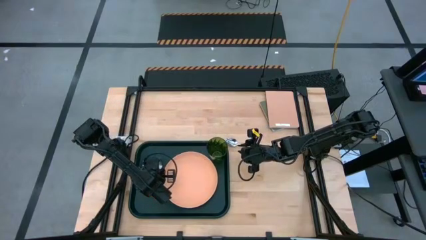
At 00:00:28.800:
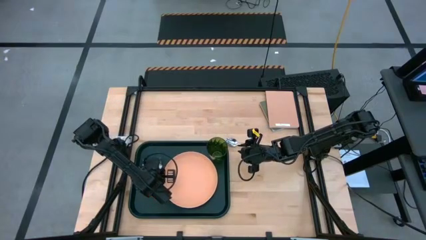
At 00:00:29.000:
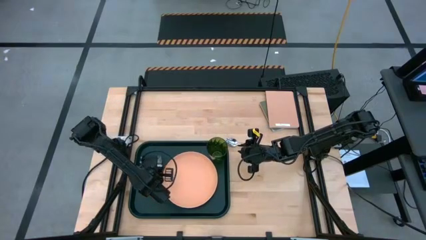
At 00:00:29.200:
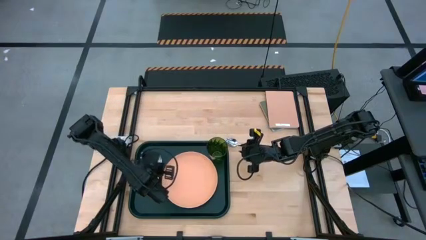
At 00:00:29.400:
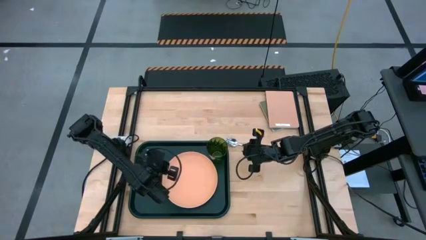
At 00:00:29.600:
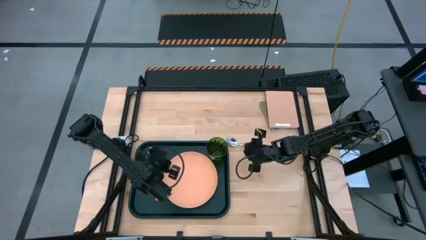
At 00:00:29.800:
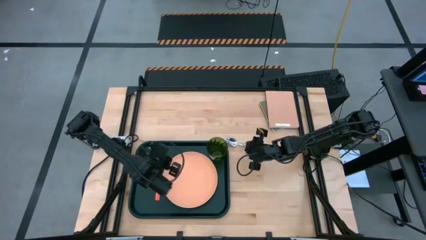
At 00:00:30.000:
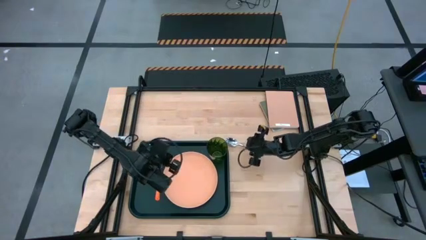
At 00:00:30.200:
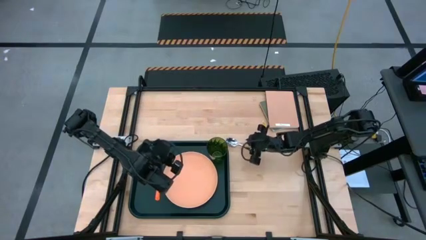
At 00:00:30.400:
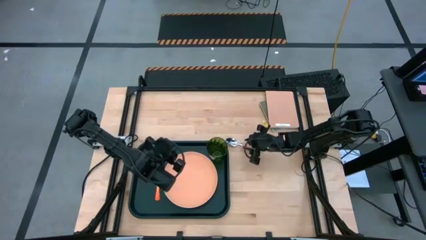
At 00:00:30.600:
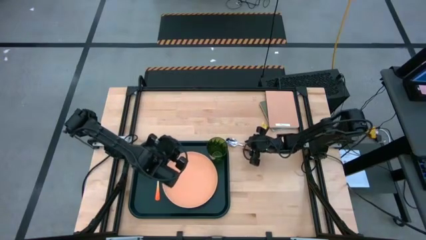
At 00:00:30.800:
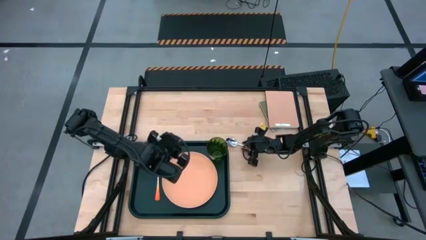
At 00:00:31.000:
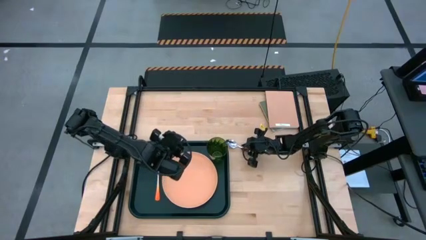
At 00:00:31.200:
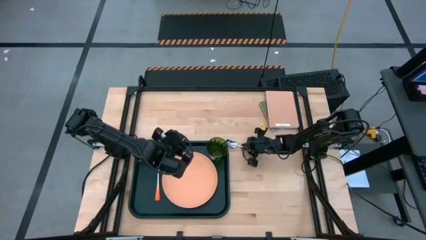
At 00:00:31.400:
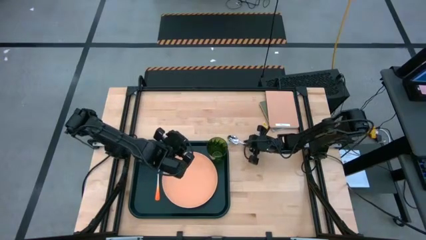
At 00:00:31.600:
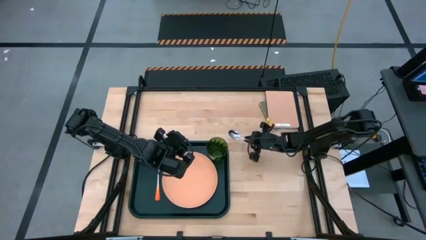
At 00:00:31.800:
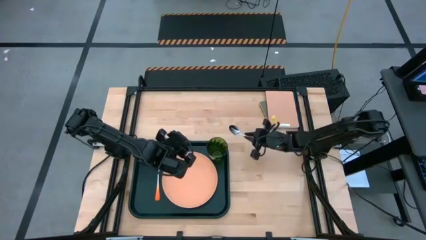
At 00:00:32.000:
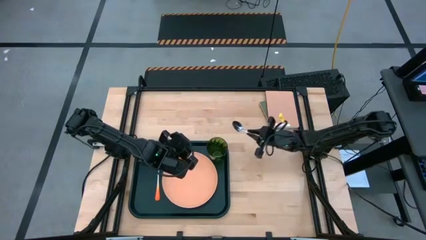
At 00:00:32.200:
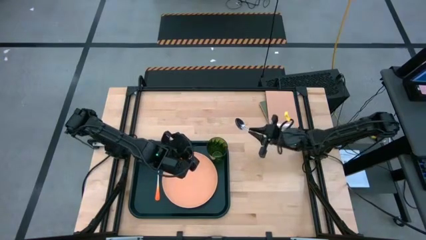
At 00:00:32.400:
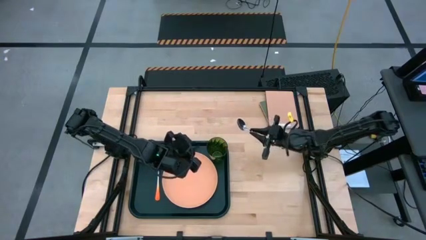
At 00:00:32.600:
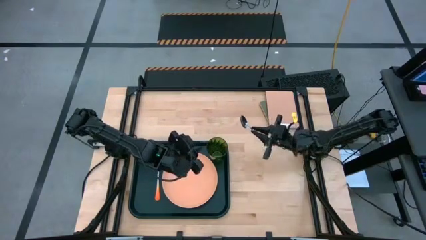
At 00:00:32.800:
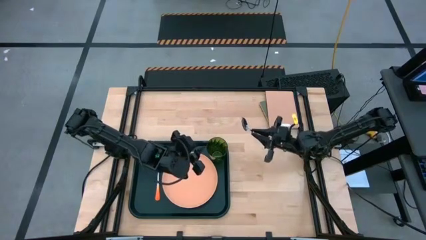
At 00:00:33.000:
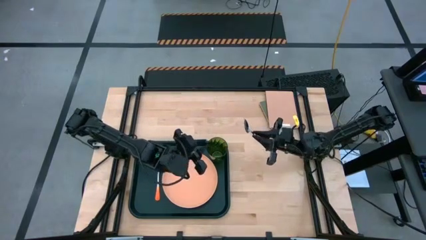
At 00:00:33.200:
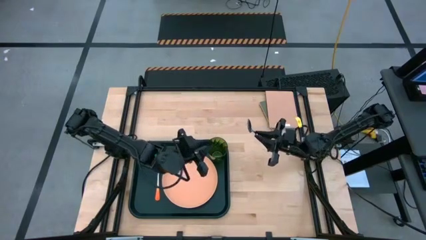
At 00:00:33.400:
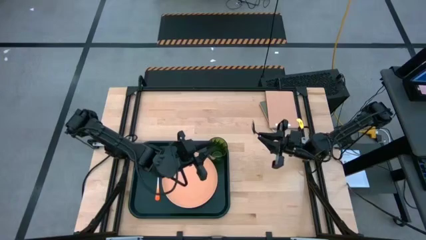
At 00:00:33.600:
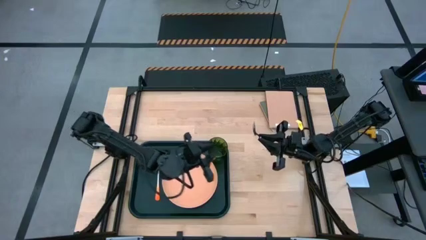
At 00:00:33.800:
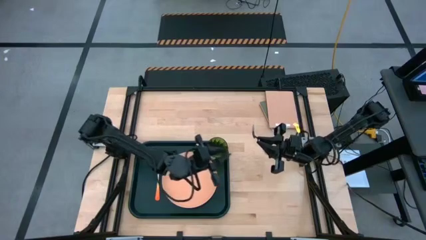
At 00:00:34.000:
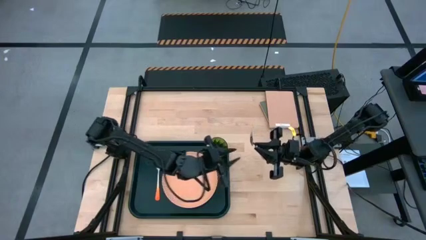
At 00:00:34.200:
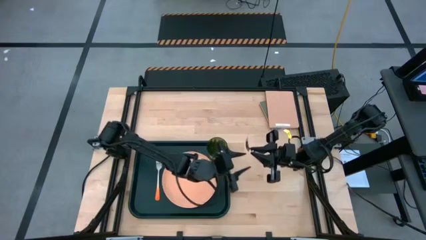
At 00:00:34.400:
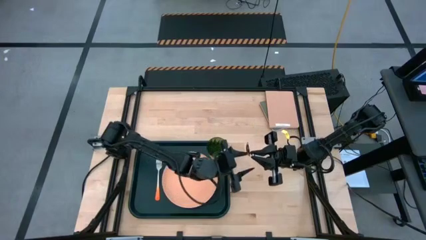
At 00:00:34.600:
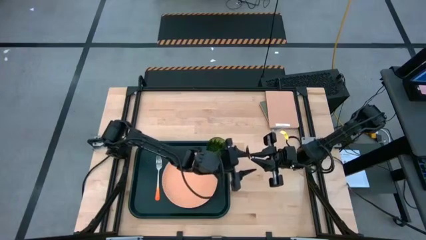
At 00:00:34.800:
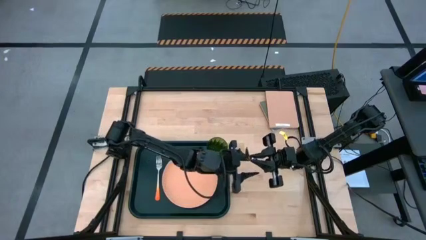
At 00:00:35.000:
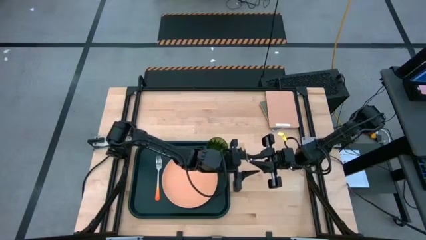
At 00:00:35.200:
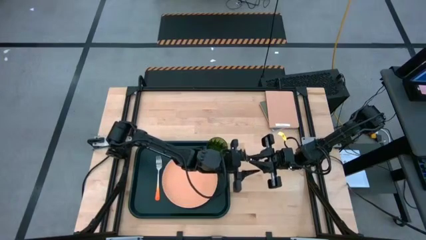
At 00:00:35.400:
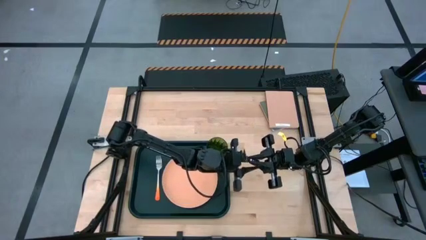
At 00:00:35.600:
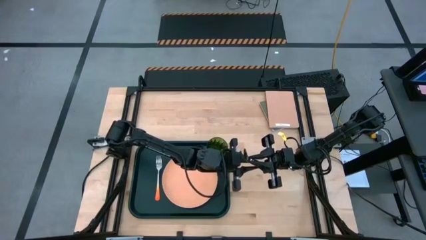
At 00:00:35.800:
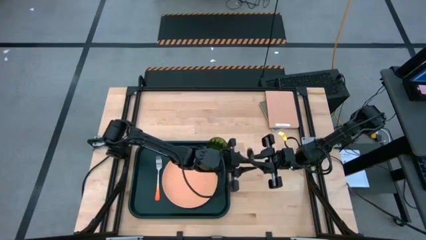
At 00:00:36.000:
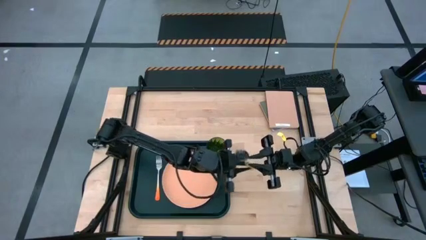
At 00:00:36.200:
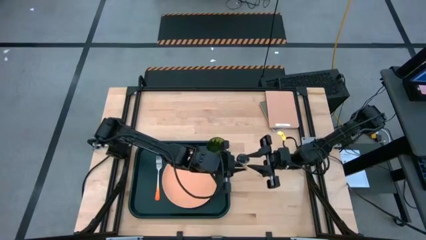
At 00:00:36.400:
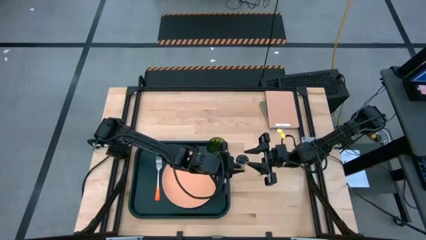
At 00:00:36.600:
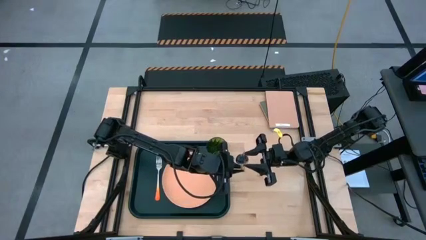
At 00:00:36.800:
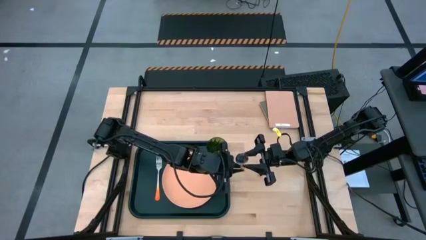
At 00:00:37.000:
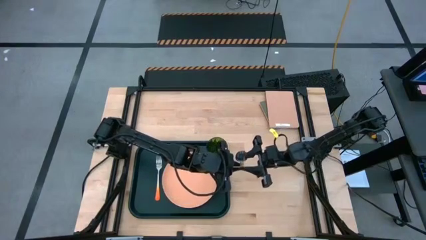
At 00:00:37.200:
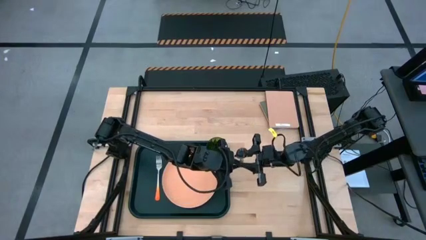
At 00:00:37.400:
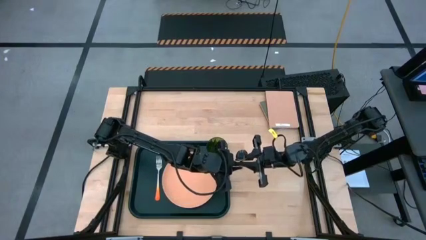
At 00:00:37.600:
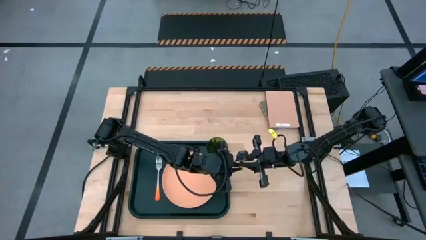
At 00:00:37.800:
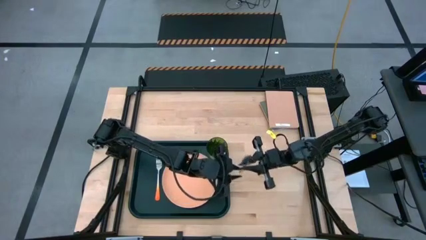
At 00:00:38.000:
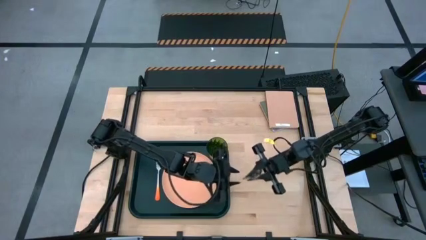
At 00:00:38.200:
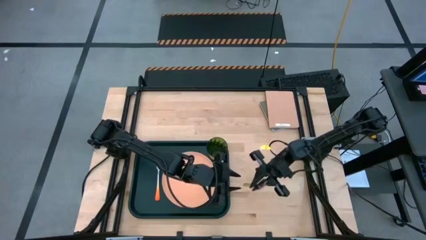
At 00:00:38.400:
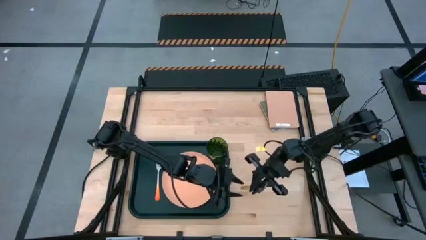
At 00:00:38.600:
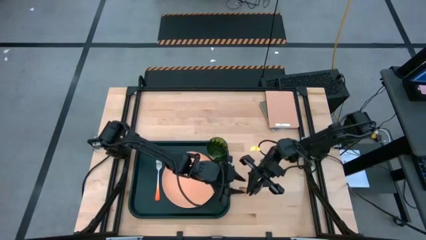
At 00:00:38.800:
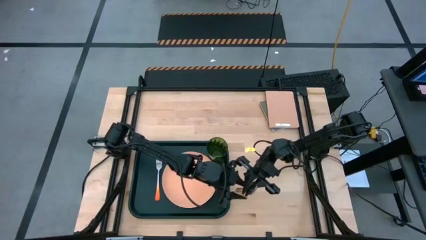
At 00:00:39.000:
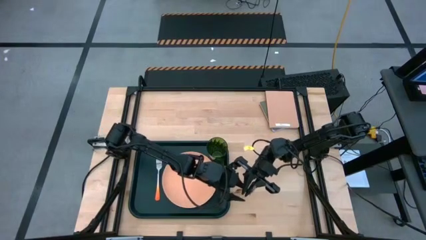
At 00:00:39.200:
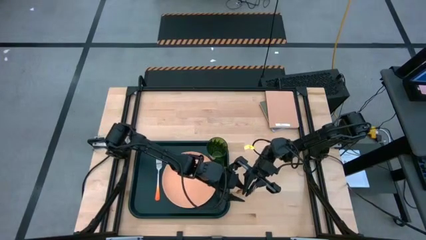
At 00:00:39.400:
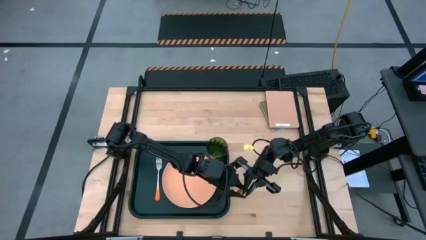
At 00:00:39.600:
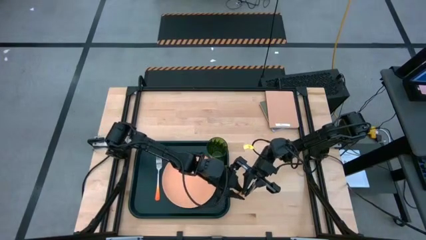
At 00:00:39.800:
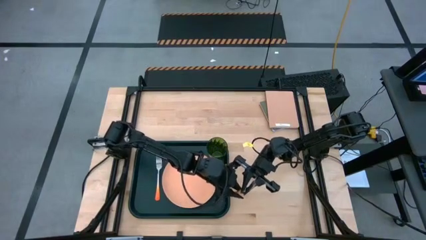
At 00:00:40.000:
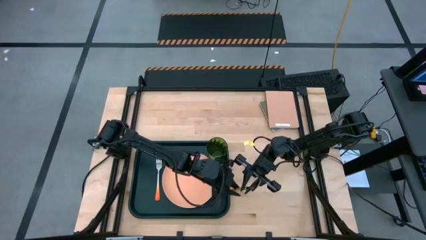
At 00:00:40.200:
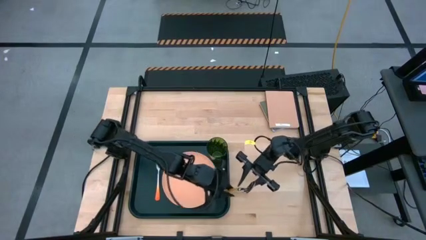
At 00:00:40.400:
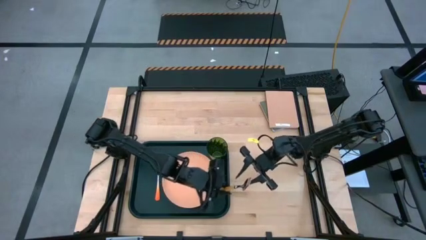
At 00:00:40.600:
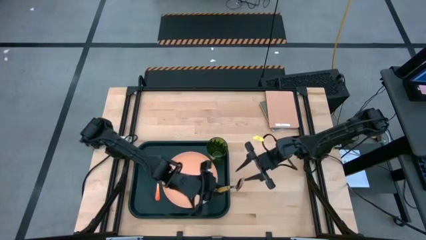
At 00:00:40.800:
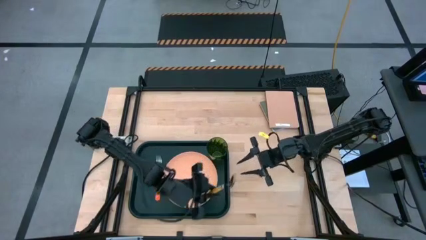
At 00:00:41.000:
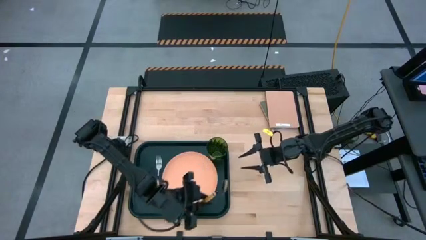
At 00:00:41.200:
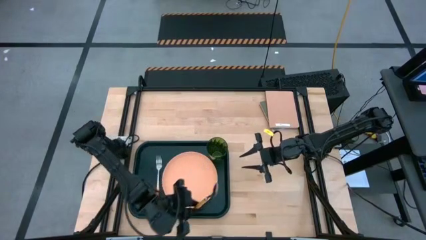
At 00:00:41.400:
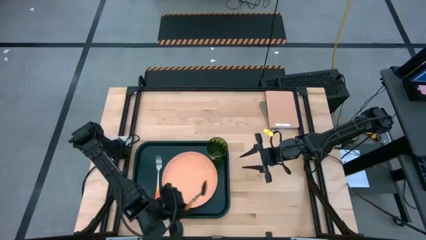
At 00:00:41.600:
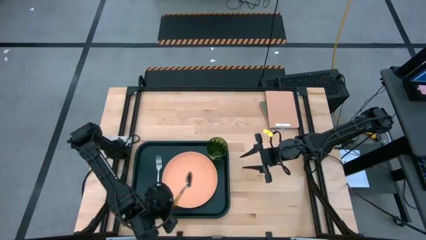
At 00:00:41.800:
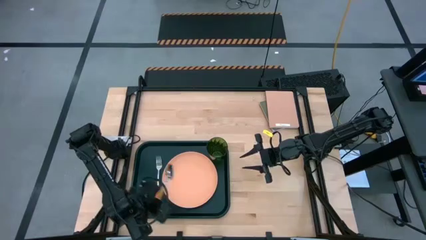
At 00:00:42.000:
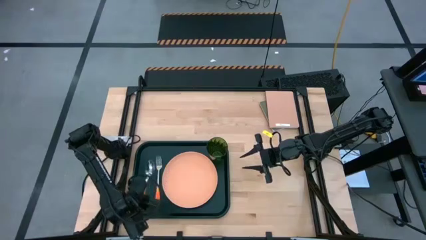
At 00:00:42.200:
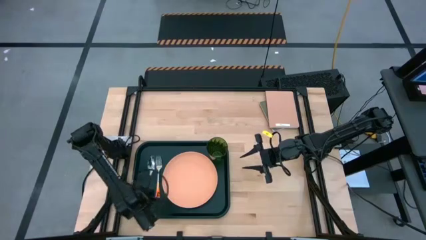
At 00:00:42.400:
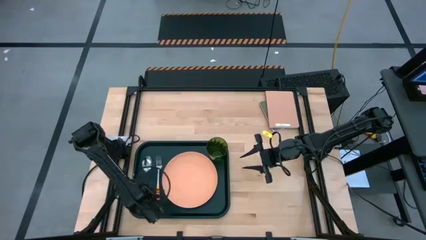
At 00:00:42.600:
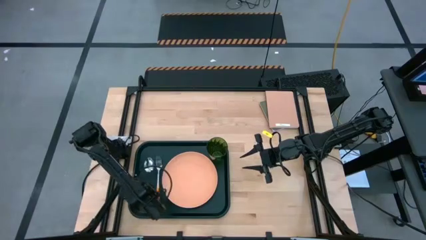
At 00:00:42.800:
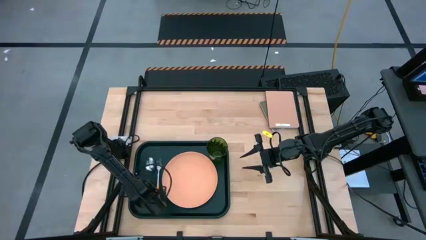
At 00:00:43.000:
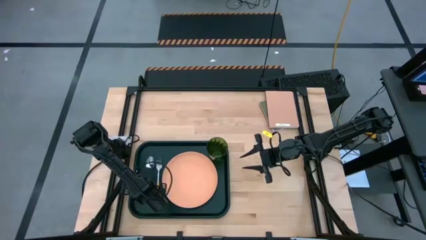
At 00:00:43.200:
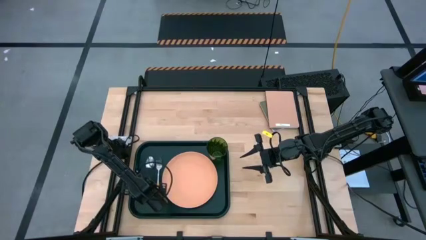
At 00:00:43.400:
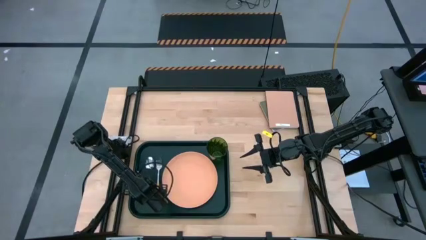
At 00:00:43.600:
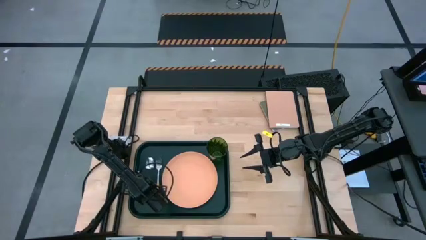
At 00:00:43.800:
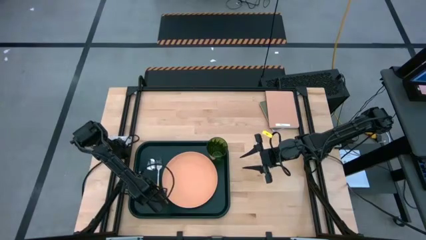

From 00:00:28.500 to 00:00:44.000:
Task: Pick and place plate/cup/fork/spoon on tray
Put the light orange spoon on the black serving tray beside the orange fork
